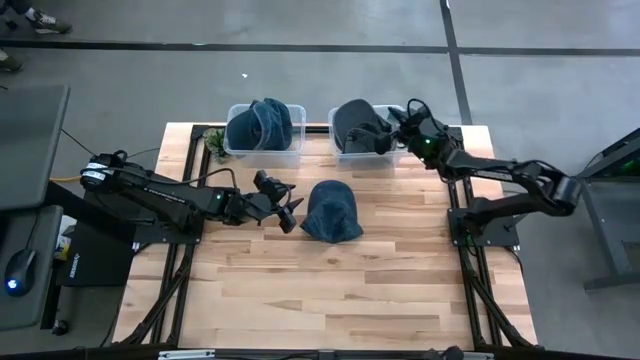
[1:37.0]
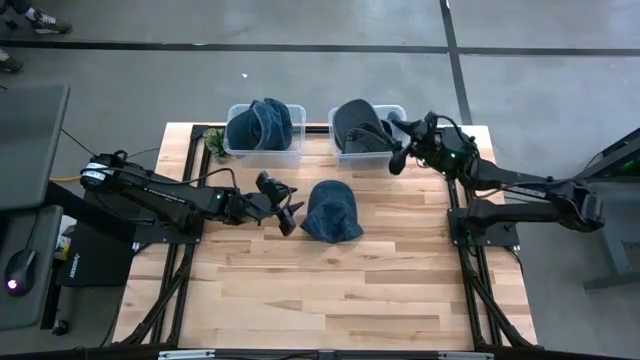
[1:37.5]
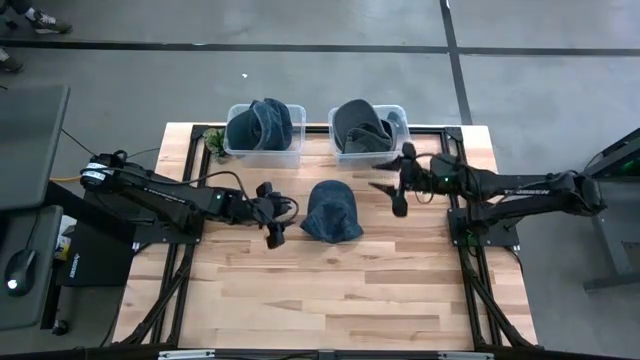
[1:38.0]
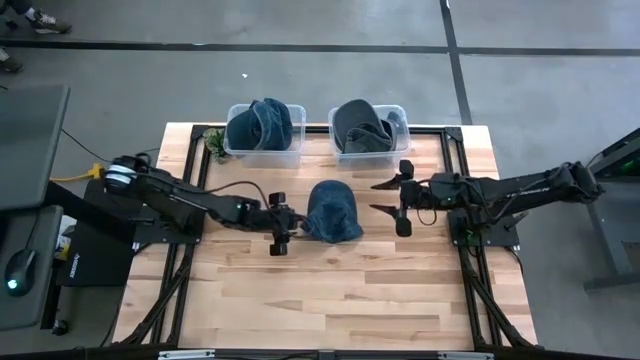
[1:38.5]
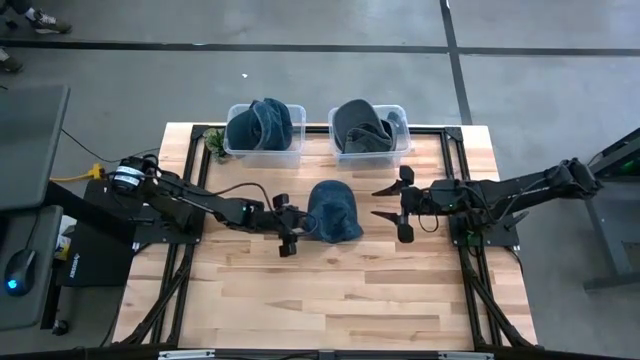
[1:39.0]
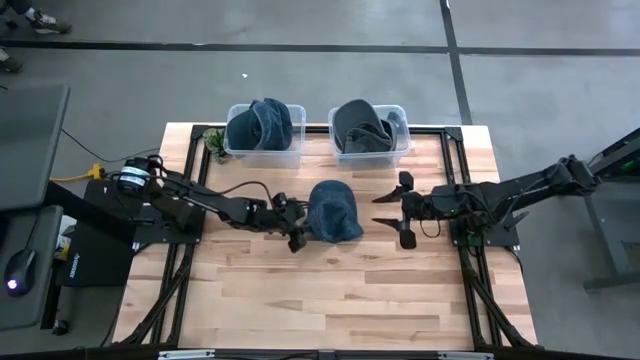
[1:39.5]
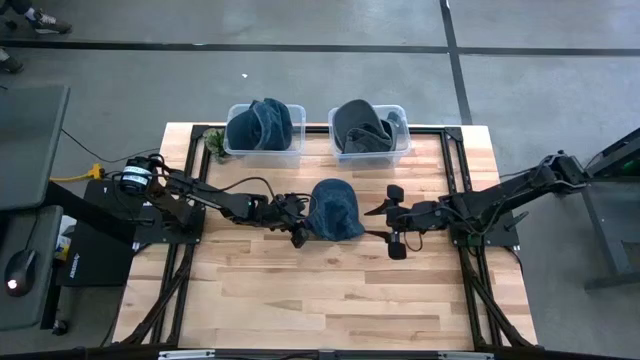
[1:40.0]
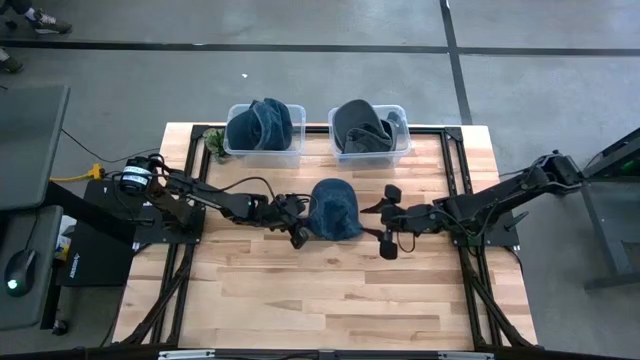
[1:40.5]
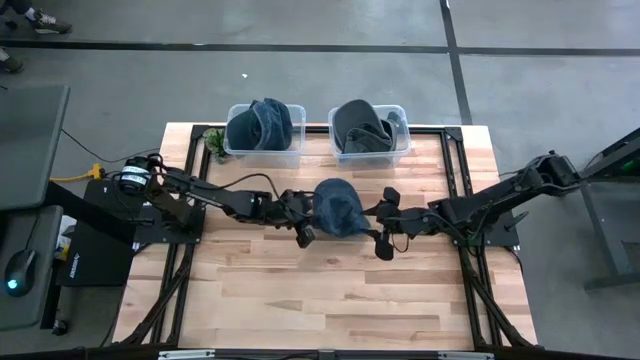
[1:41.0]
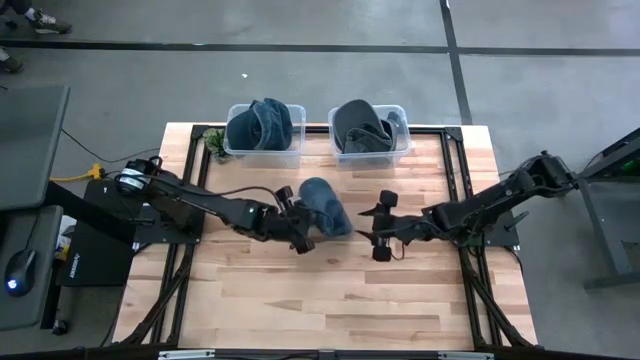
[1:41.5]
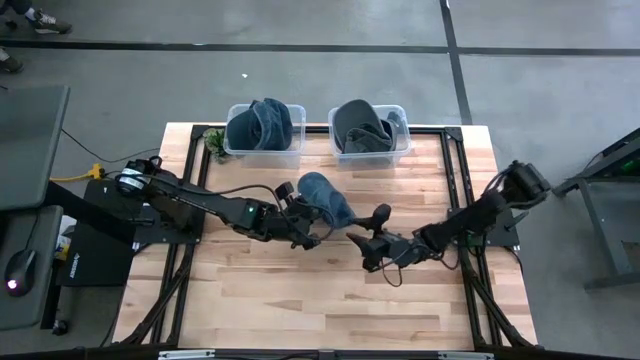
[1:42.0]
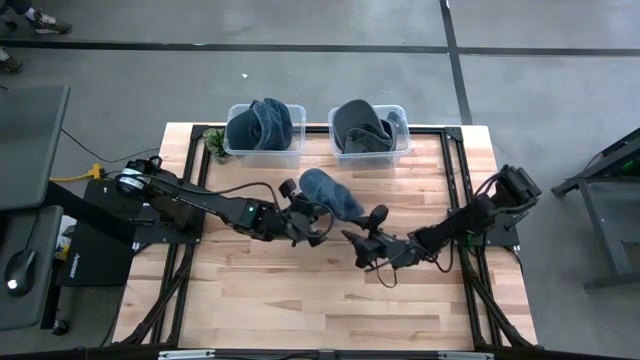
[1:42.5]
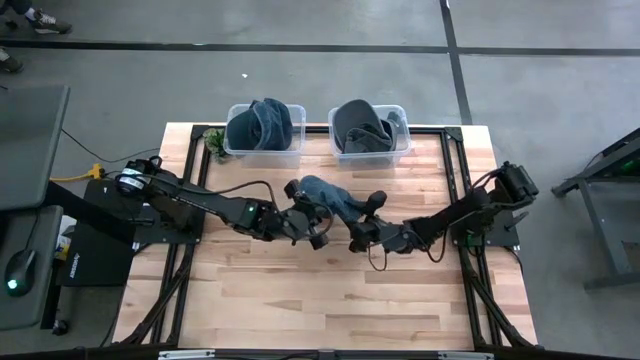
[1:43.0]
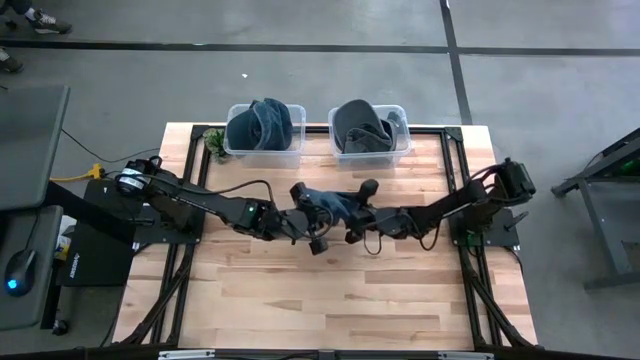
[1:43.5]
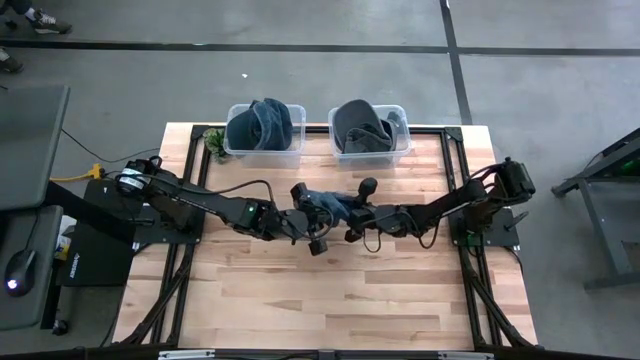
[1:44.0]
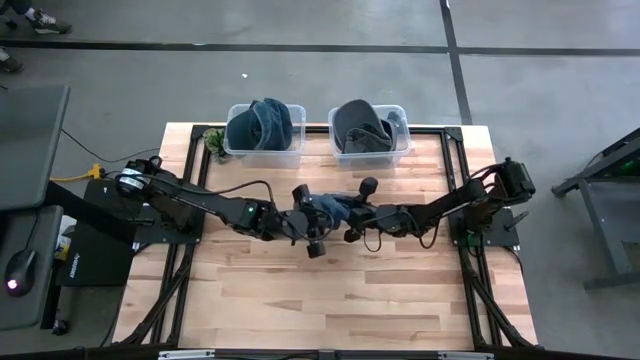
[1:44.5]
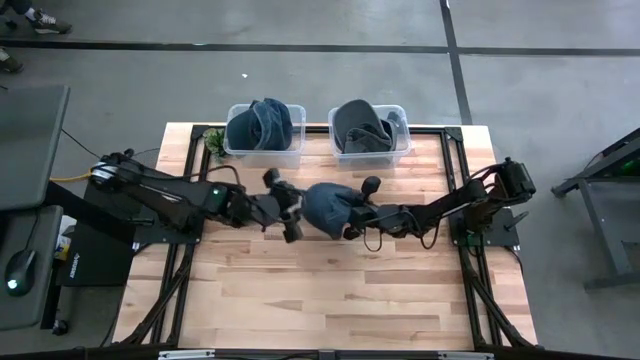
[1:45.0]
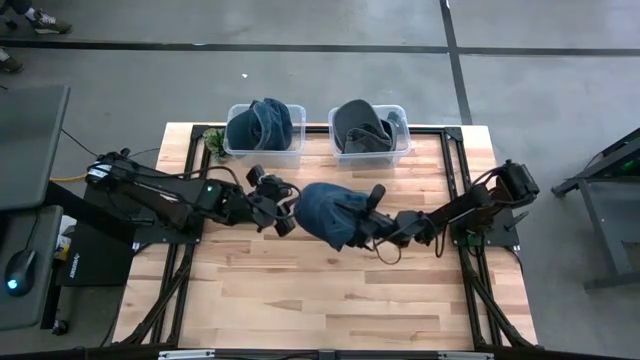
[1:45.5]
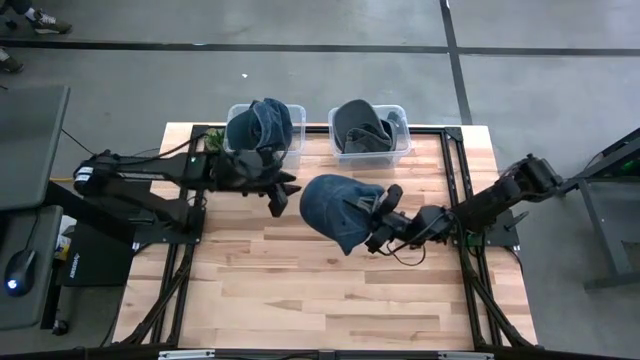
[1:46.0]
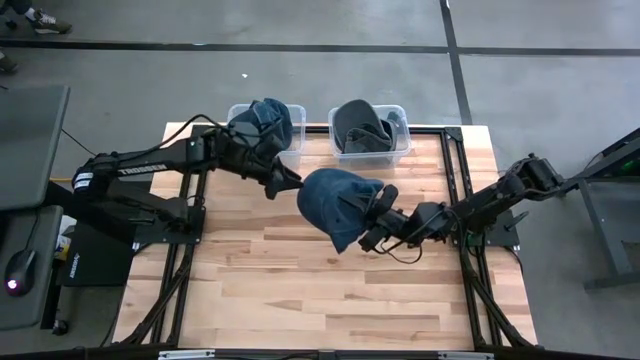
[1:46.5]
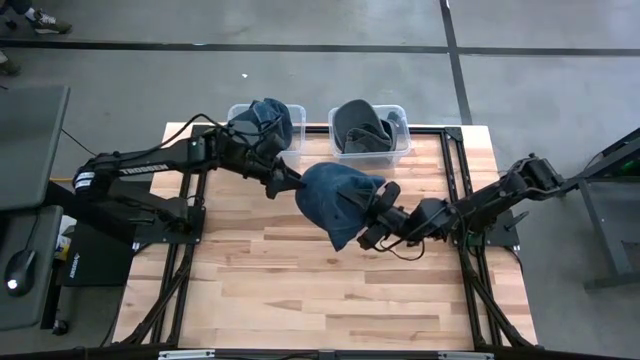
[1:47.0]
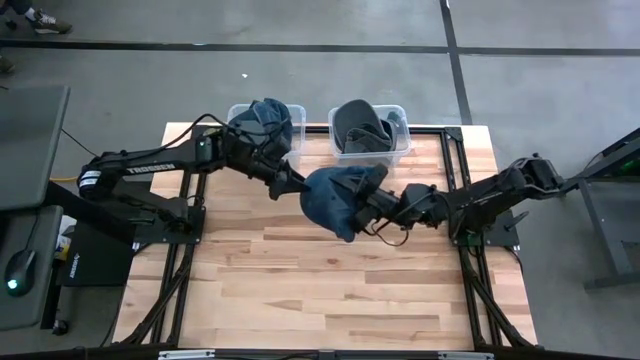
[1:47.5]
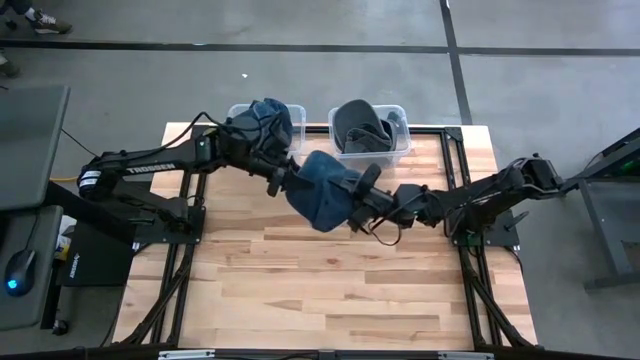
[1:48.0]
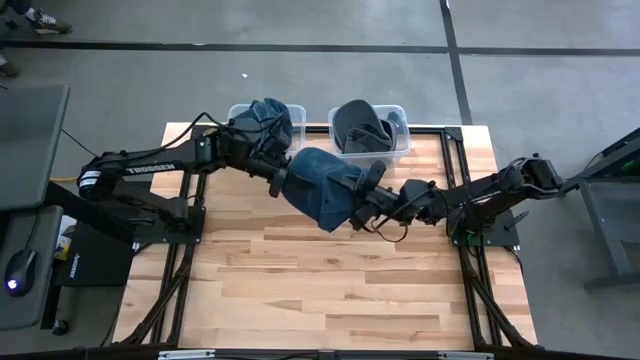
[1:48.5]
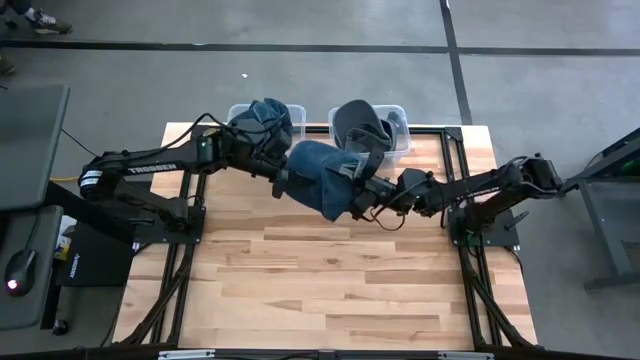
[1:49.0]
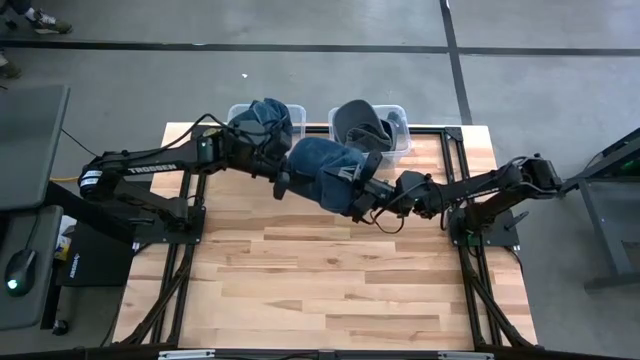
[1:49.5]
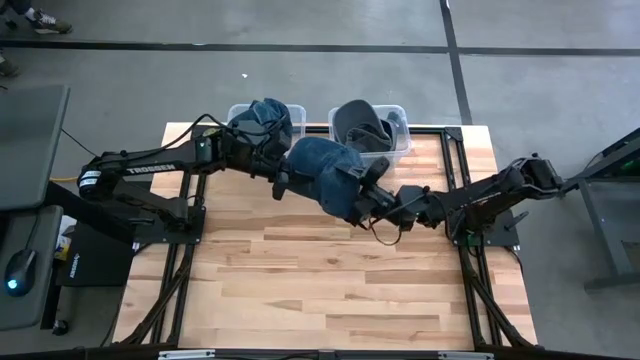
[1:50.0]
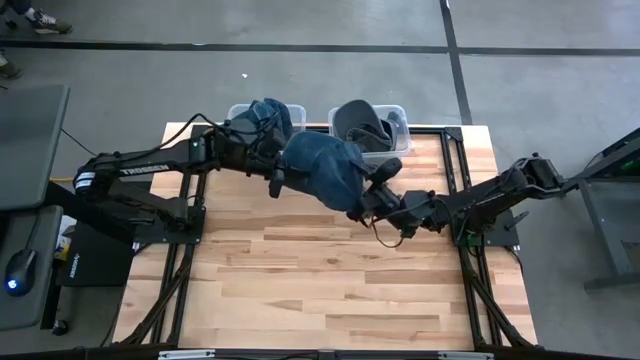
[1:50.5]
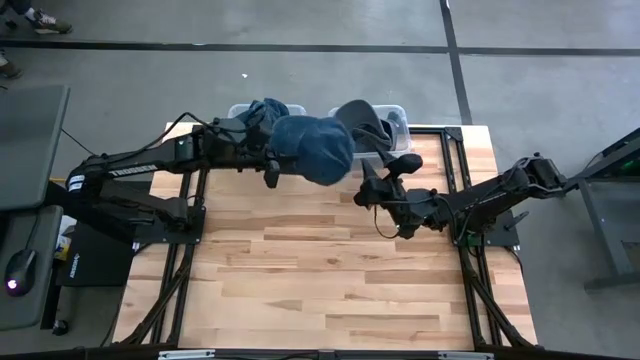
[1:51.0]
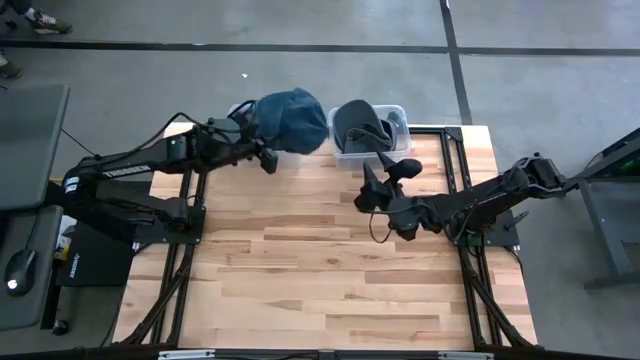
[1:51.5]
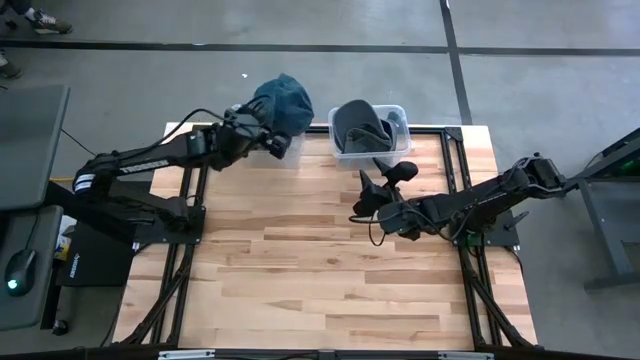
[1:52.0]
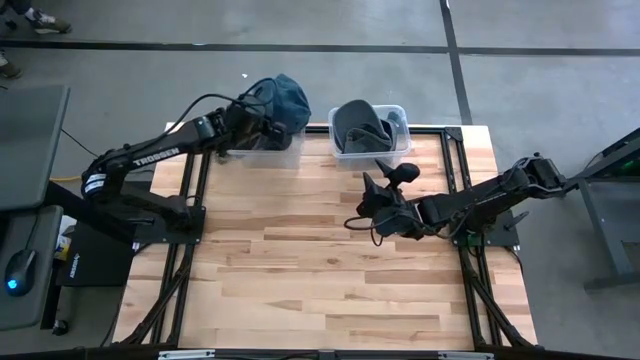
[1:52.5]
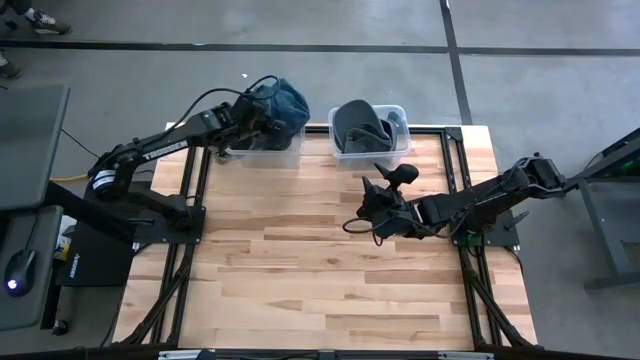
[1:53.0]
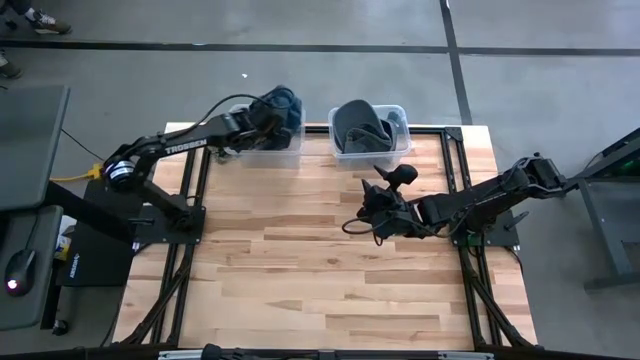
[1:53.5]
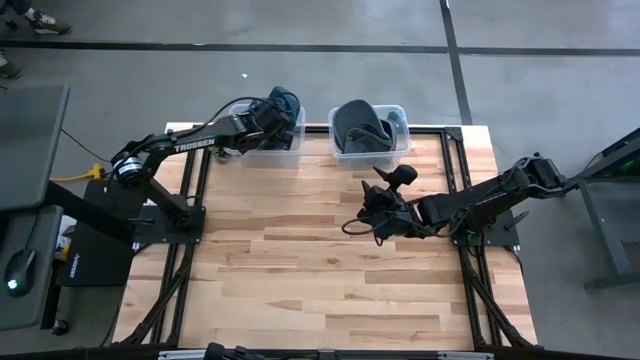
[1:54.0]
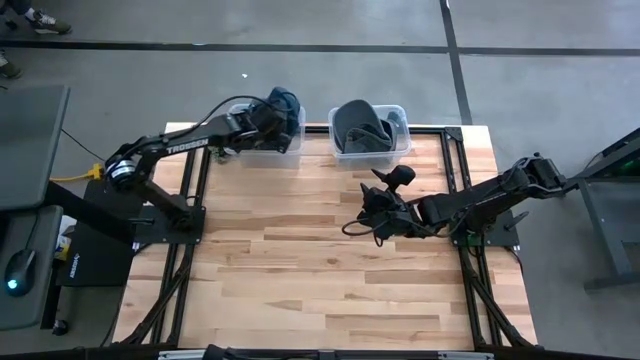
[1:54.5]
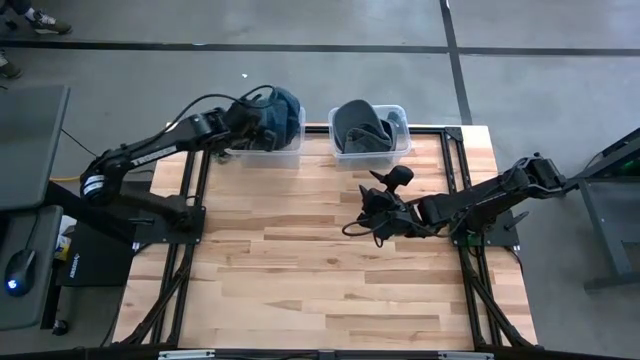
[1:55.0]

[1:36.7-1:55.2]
Task: Pick & Place hat
Put the blue cap into the left transparent bin

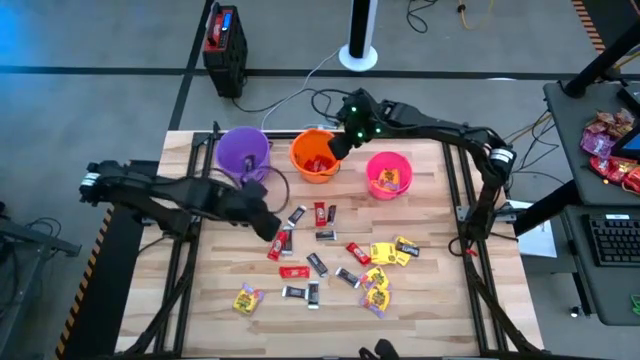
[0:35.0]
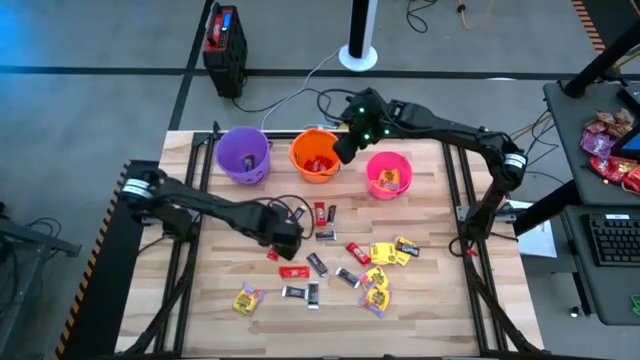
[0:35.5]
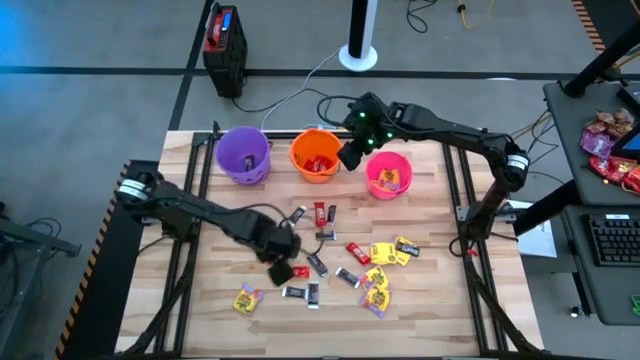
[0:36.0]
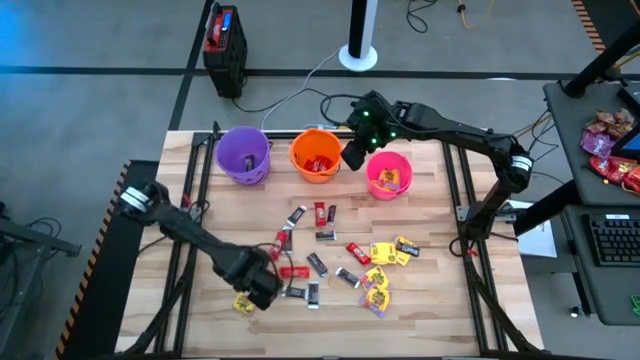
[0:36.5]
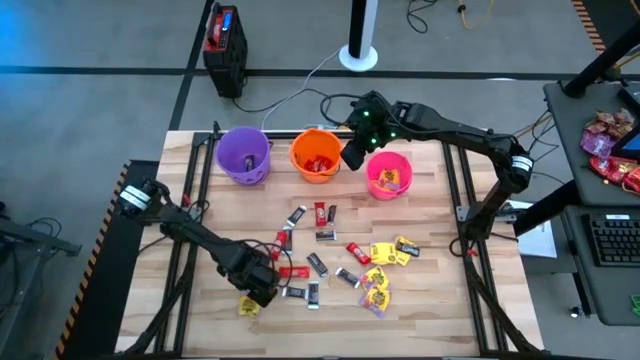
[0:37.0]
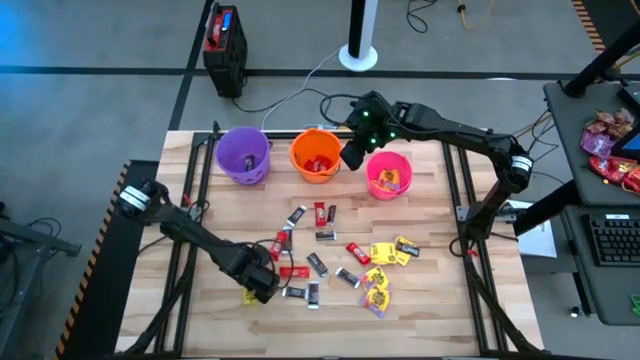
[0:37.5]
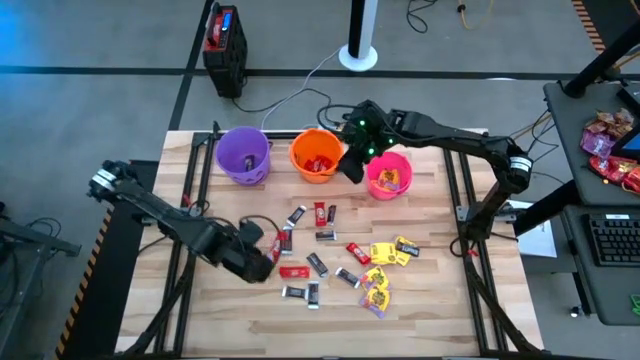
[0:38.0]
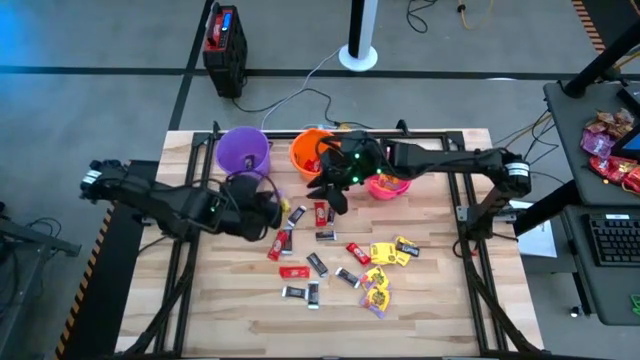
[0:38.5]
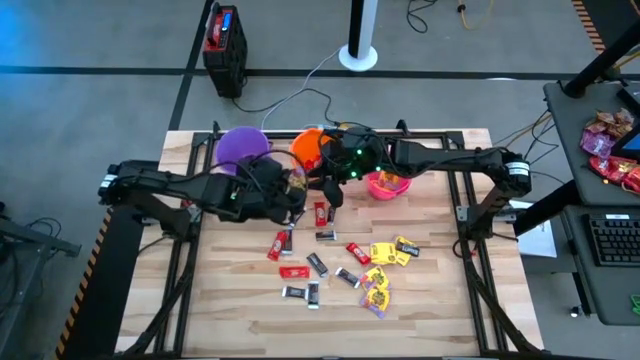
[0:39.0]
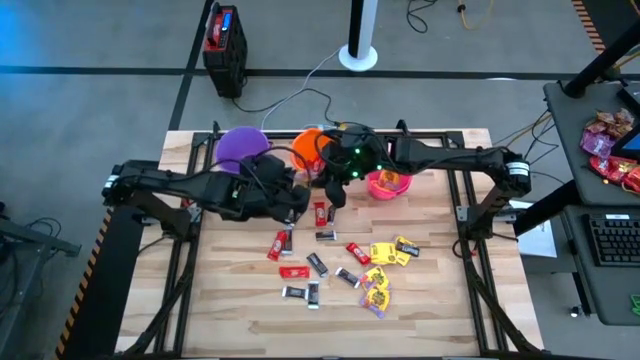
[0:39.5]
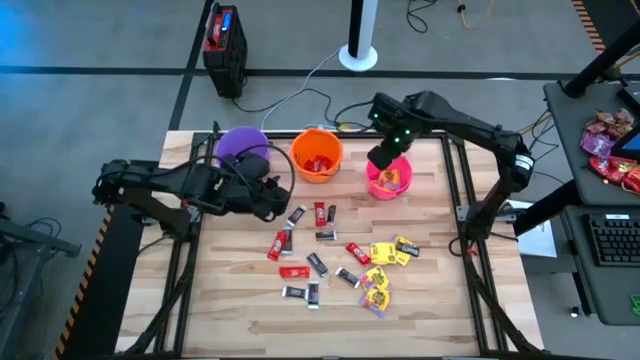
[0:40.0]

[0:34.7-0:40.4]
Task: Sort candy by brand, put in halloween buckets
Put the yellow candy into the pink bucket
